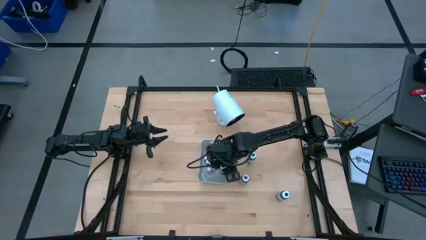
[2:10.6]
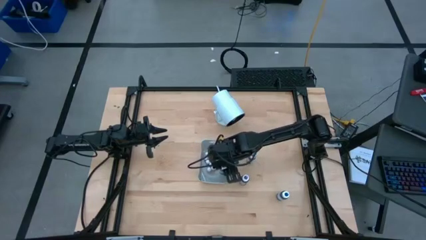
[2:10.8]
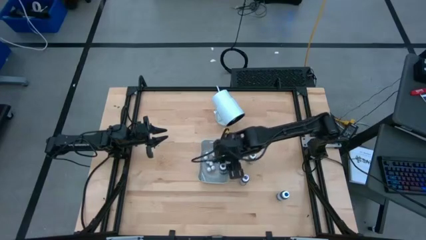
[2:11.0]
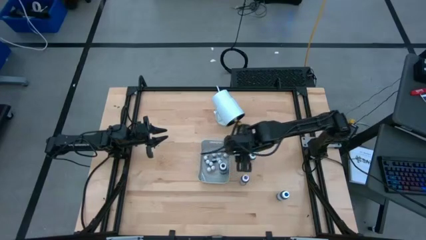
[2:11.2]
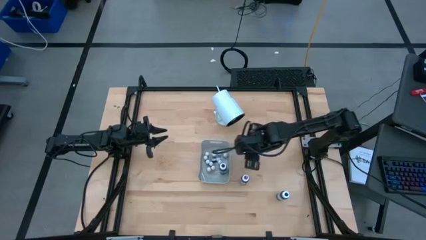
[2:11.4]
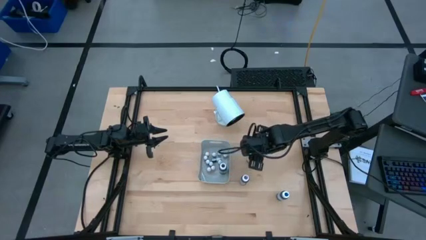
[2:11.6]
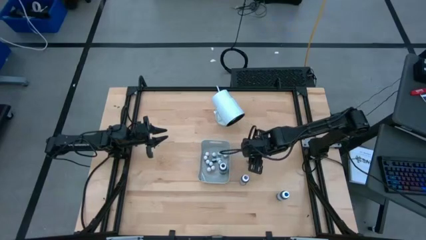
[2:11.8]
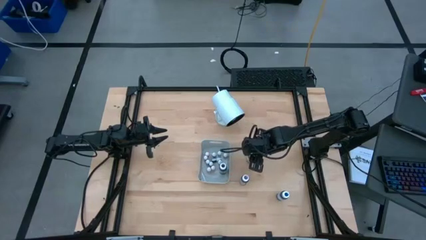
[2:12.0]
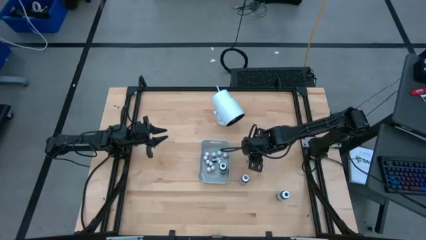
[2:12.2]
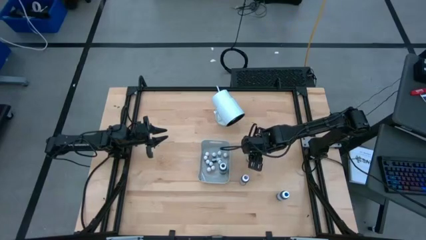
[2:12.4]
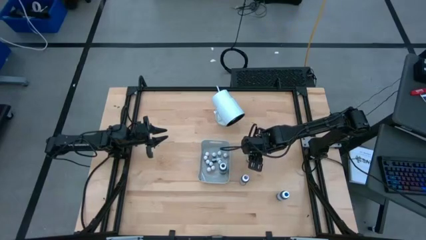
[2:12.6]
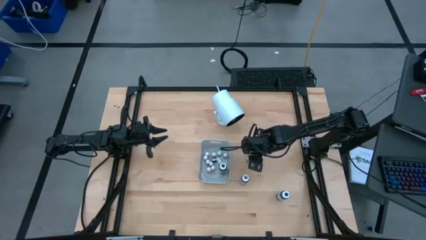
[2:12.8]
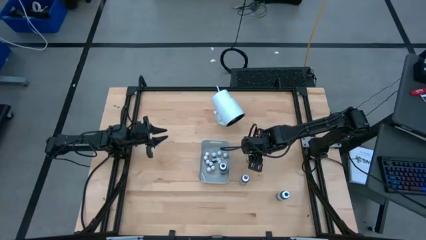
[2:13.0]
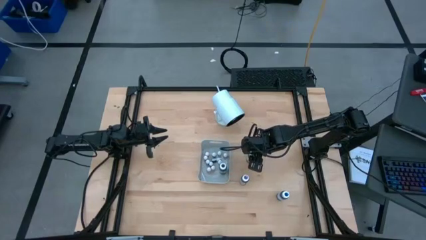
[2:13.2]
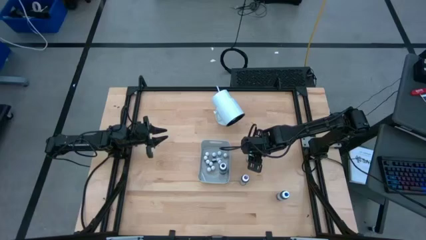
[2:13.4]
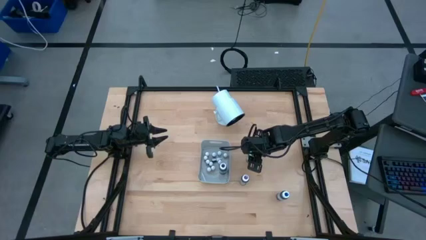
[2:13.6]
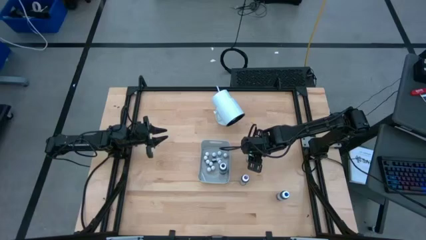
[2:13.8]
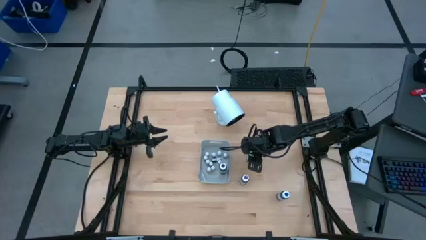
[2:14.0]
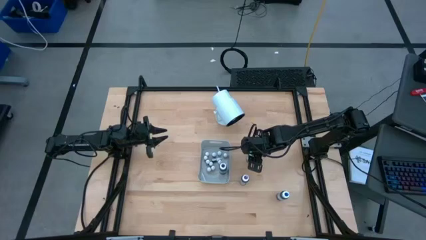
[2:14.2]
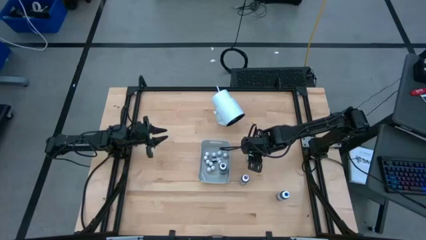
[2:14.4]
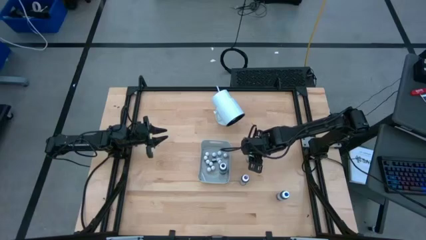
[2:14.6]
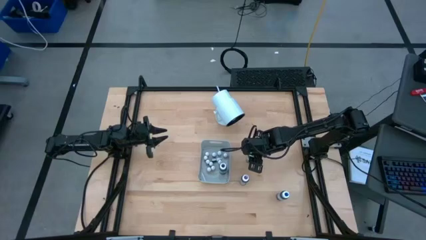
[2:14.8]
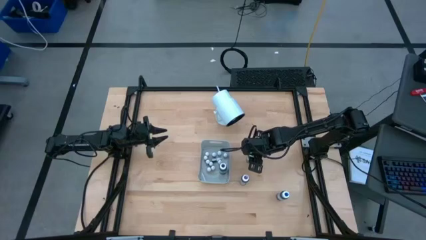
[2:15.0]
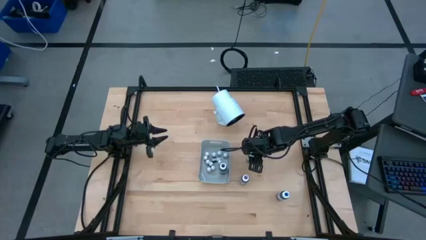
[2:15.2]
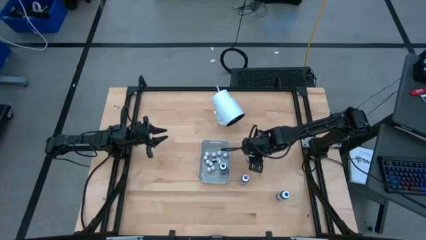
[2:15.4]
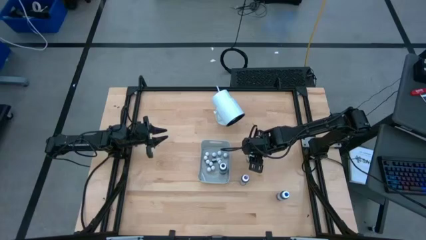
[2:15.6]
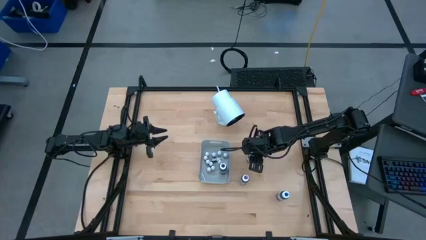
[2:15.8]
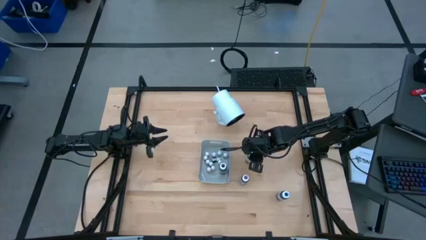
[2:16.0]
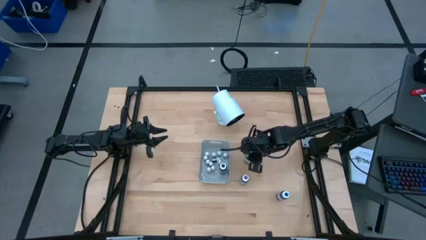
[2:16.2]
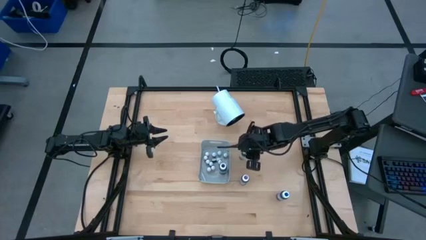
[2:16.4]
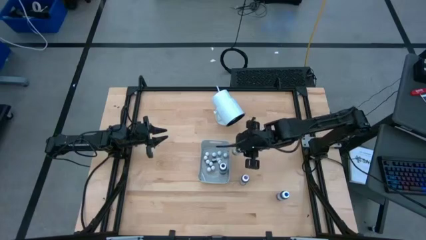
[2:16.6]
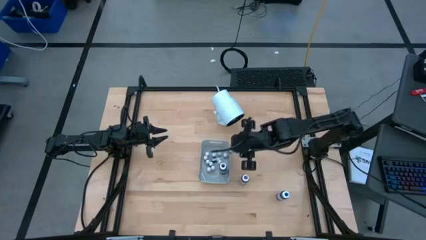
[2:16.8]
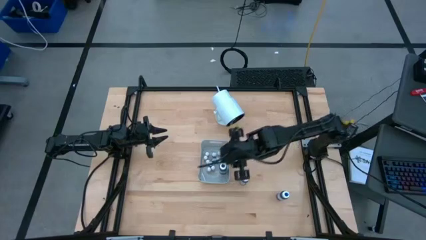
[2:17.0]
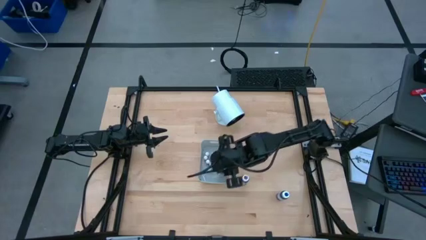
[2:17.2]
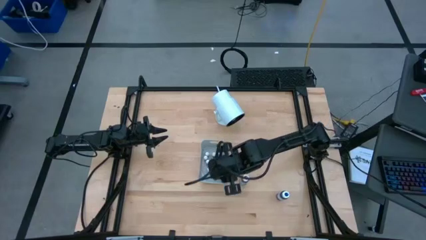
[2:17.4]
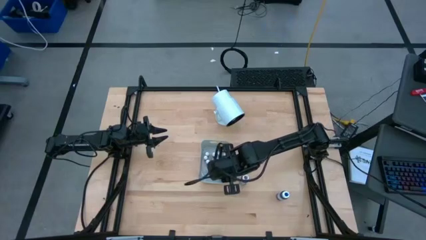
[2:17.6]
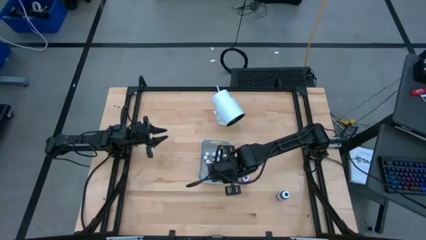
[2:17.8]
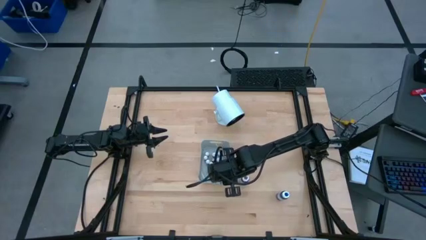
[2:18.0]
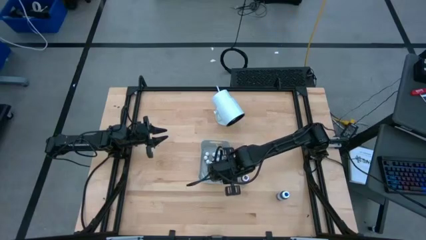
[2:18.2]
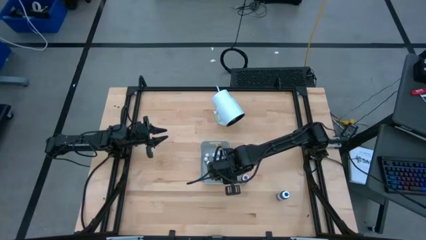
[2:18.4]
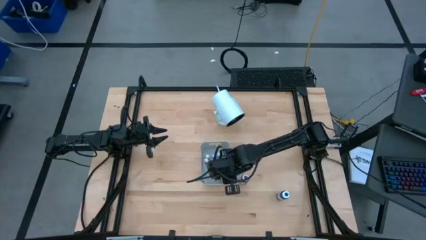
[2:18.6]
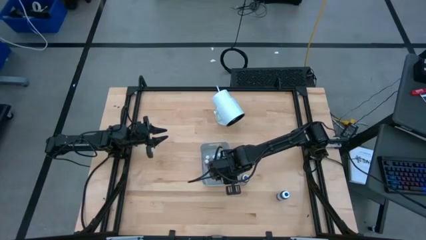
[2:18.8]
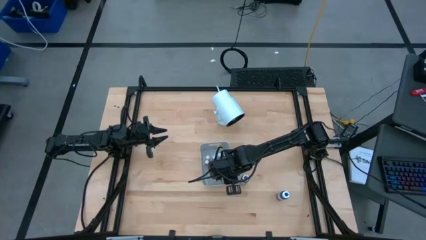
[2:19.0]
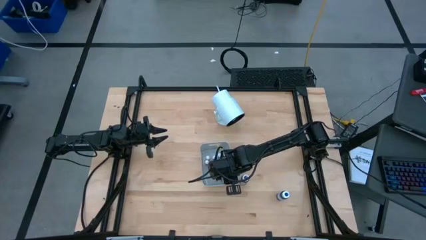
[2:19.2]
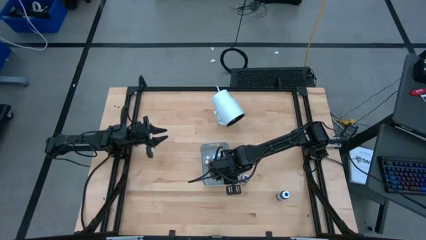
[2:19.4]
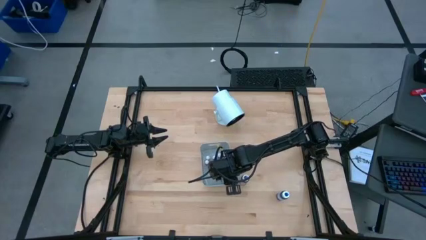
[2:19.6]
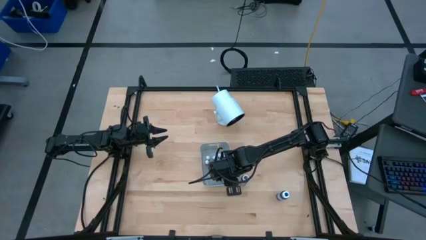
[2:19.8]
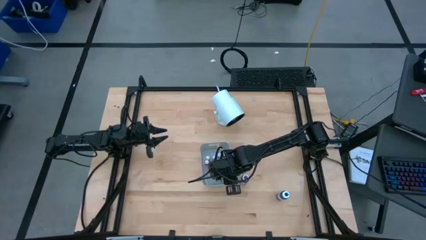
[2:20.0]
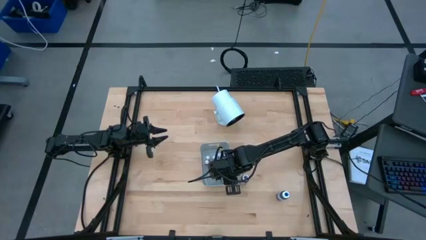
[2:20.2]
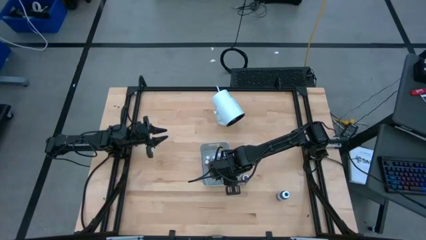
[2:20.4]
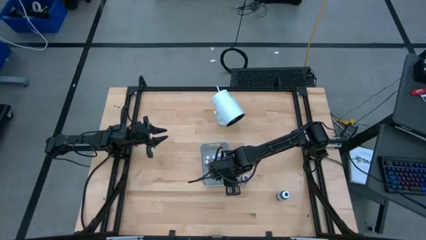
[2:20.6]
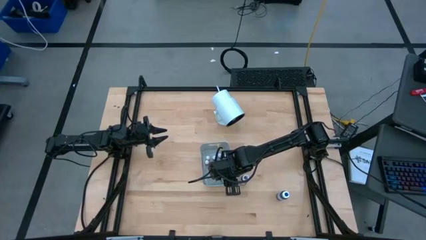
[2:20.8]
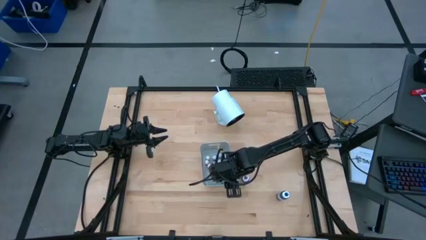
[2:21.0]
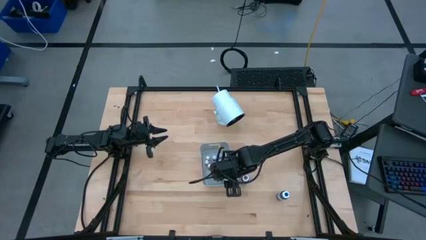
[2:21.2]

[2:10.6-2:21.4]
Task: Pick & Place food coloring
Put the big green food coloring bottle into the gray bin

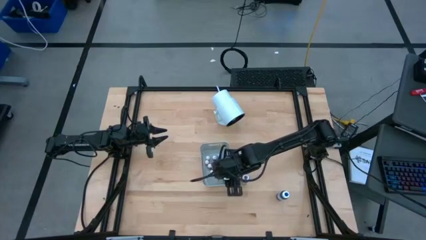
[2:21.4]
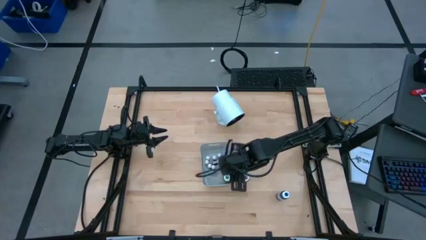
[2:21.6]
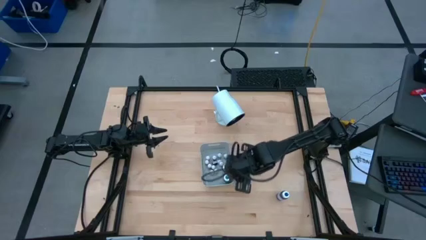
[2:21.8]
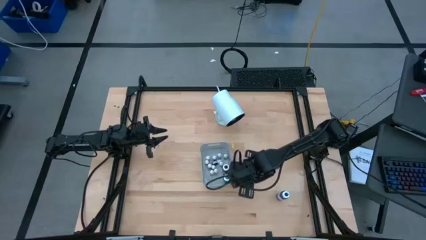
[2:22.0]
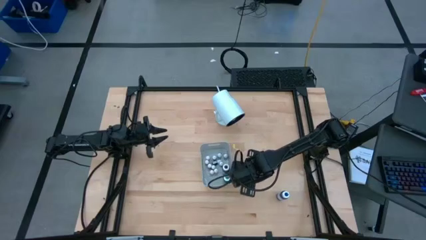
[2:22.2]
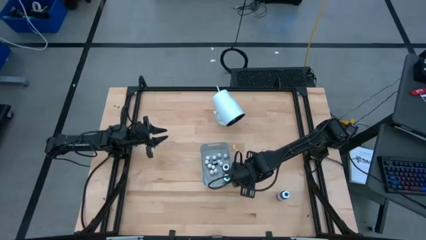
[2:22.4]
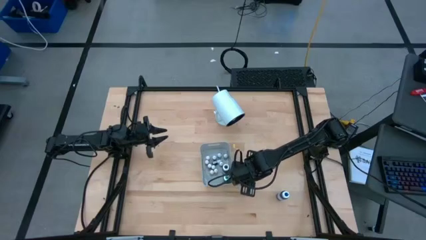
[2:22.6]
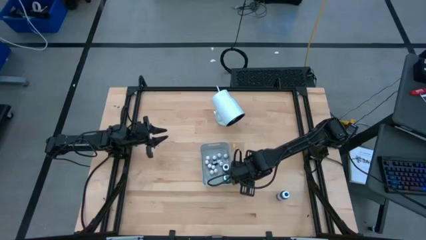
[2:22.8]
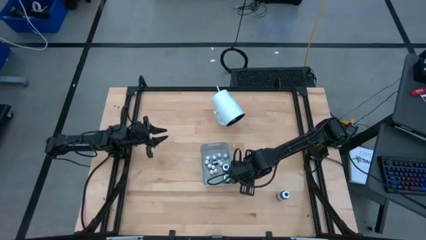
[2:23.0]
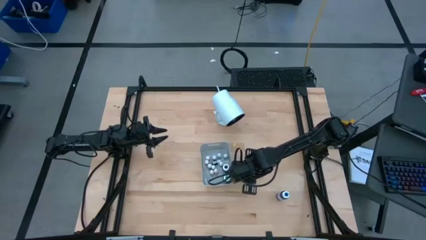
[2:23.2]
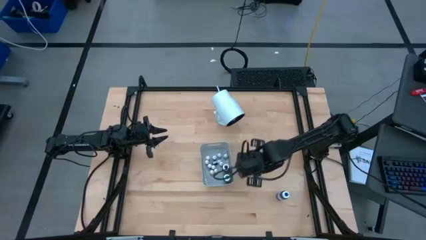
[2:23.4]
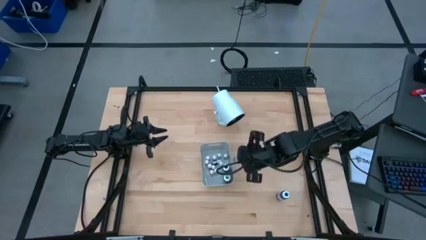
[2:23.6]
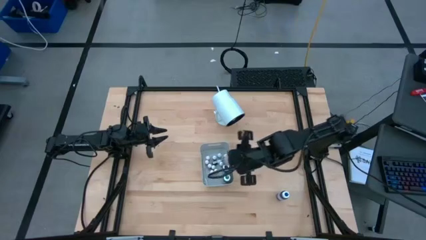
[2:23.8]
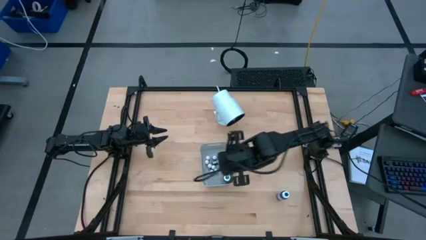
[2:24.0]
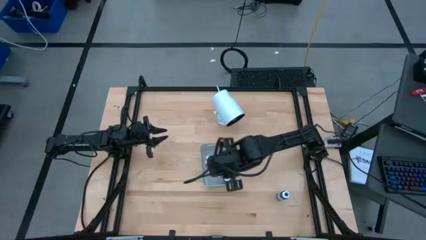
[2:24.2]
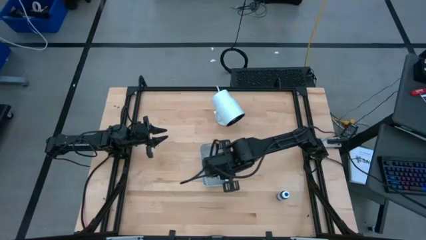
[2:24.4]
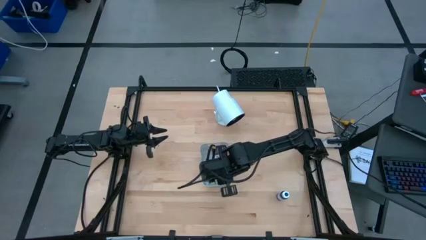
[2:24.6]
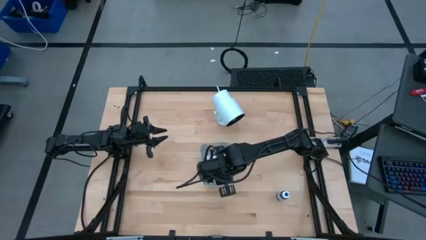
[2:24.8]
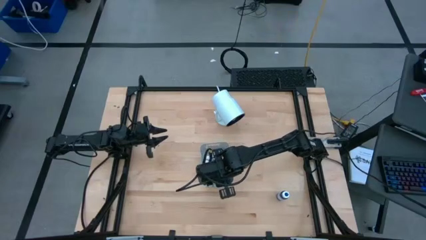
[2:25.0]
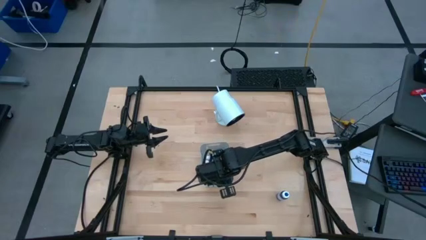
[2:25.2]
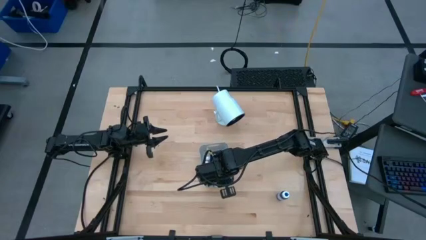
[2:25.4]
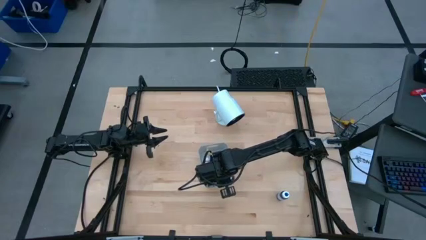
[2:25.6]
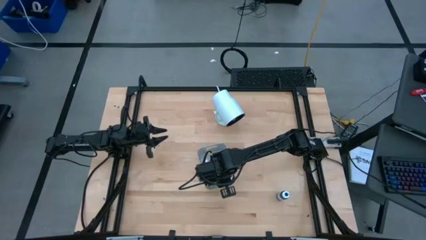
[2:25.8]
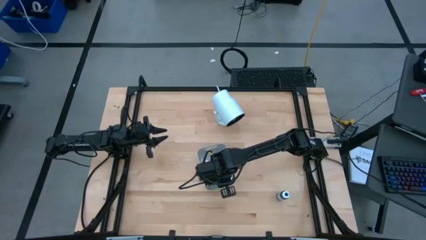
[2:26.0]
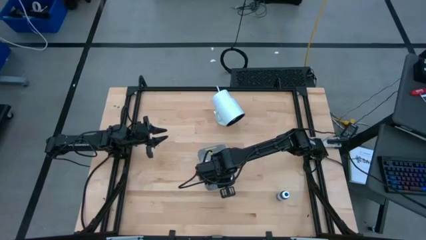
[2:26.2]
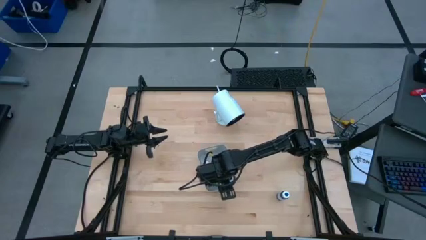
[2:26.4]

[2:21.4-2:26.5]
Put the big violet food coloring bottle into the gray bin
